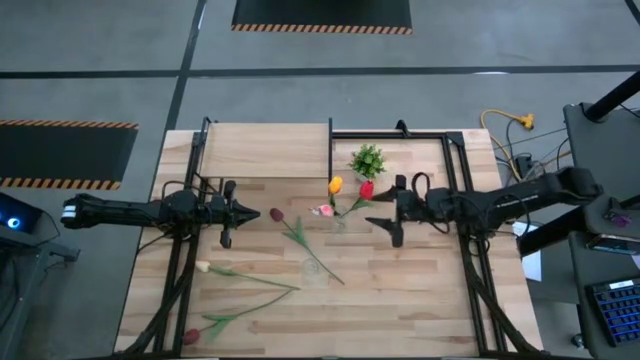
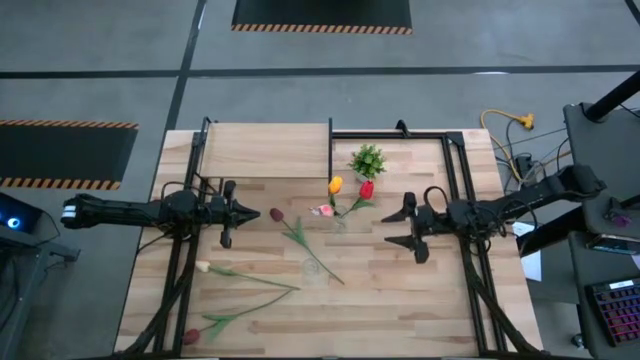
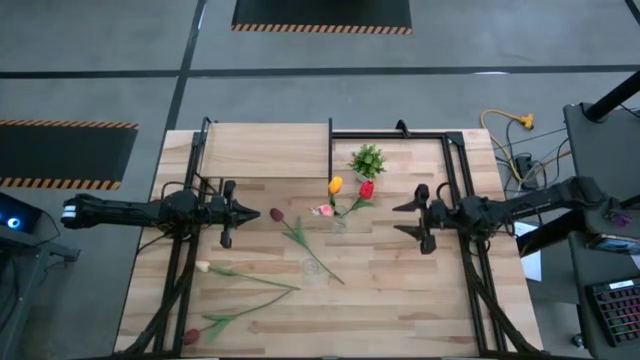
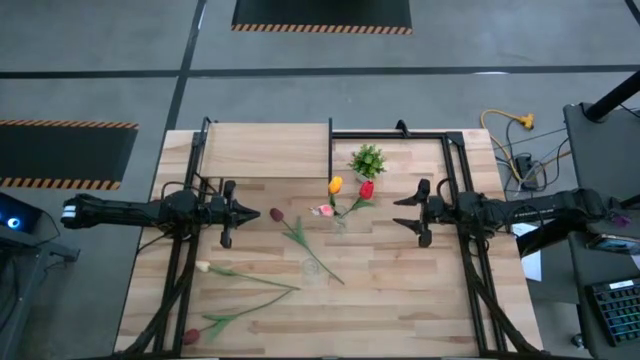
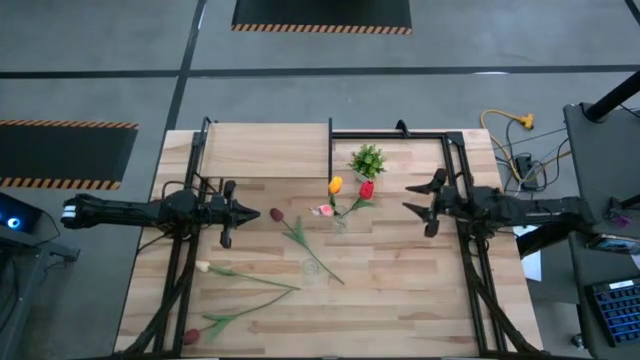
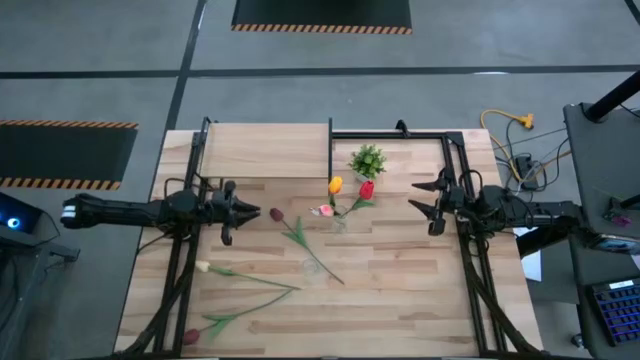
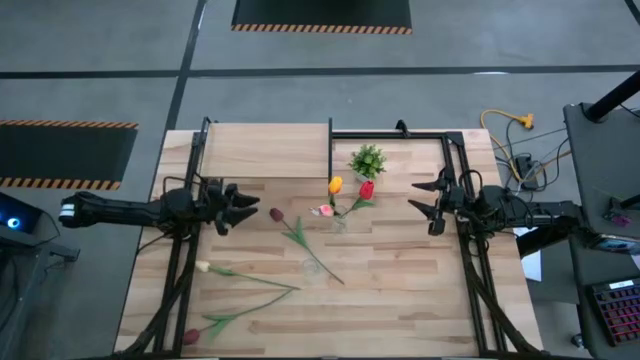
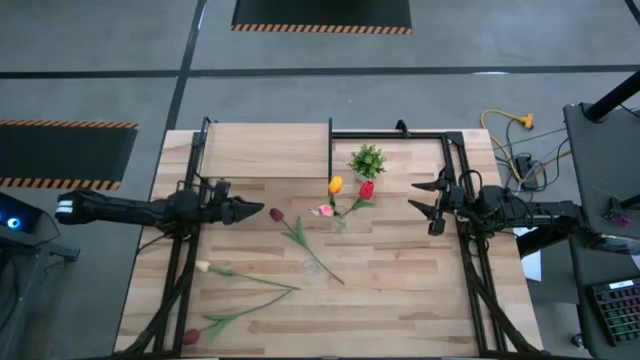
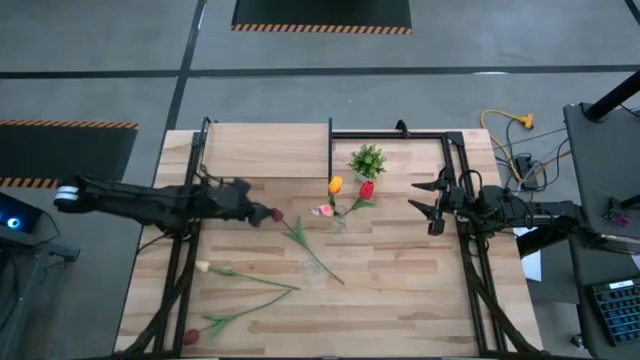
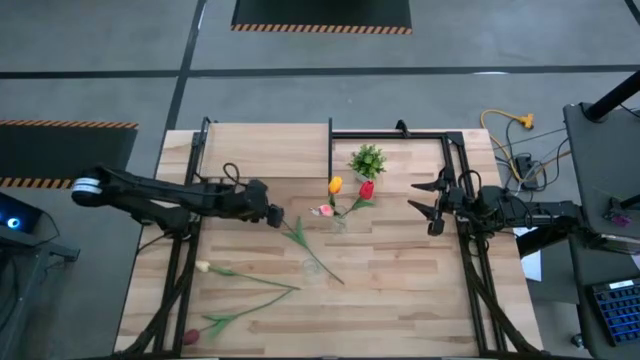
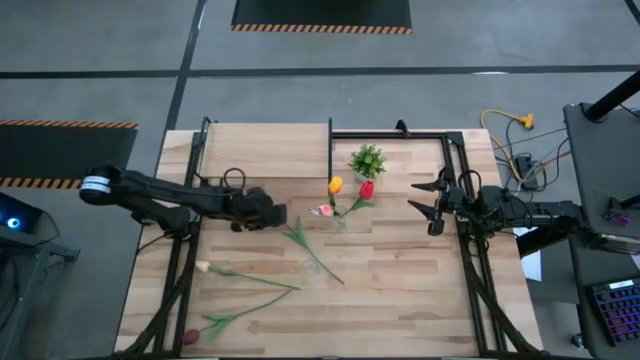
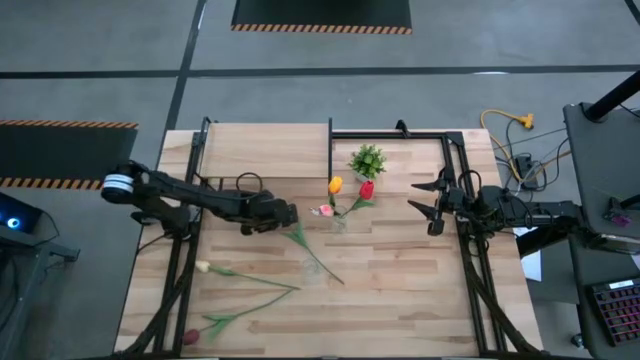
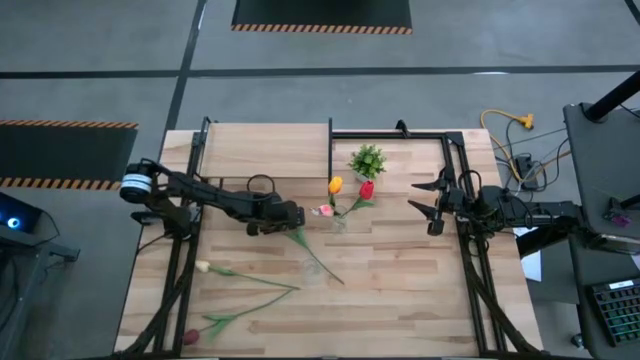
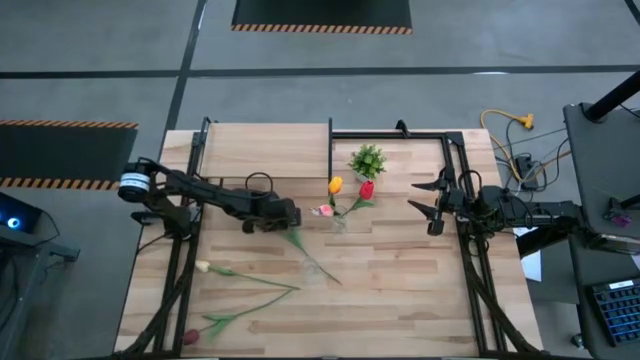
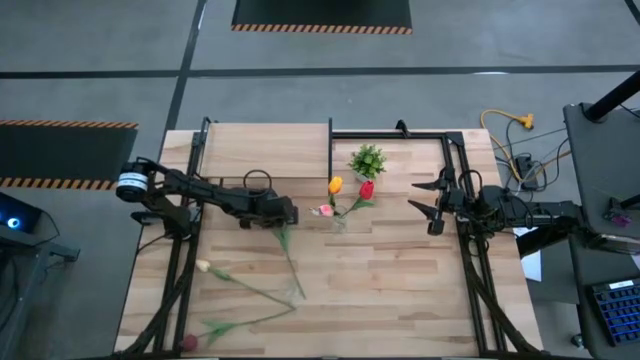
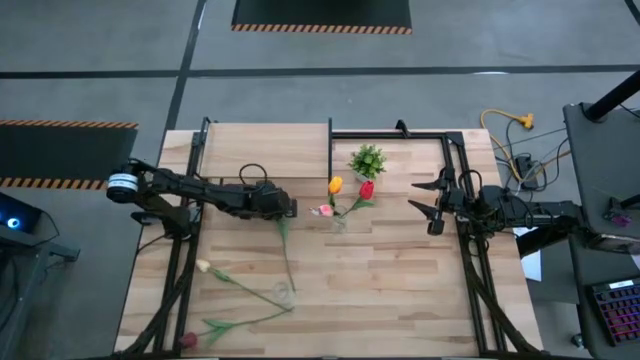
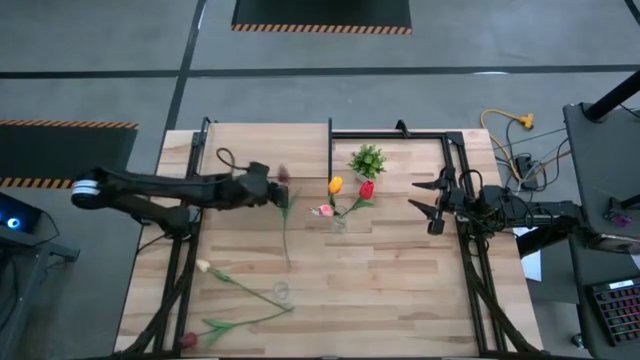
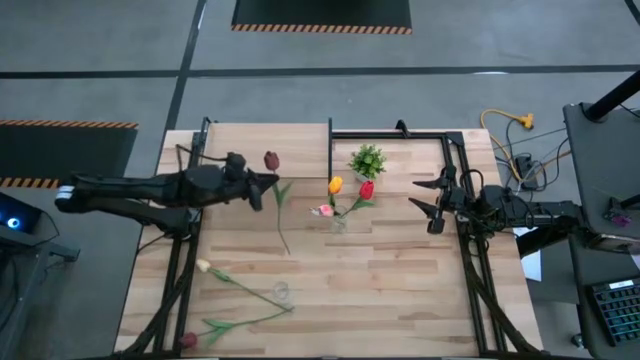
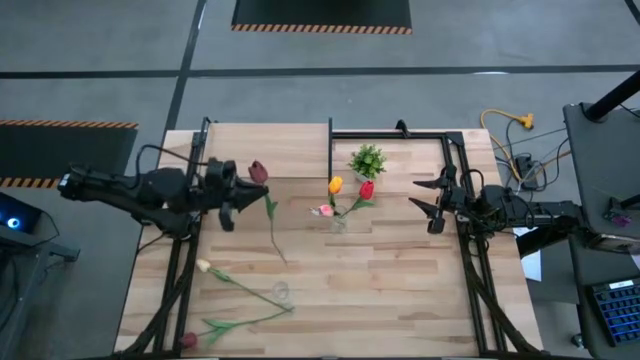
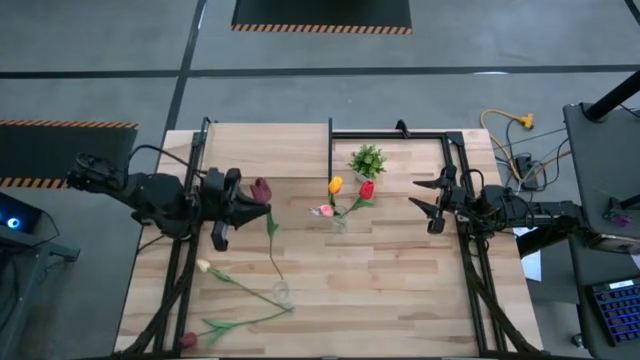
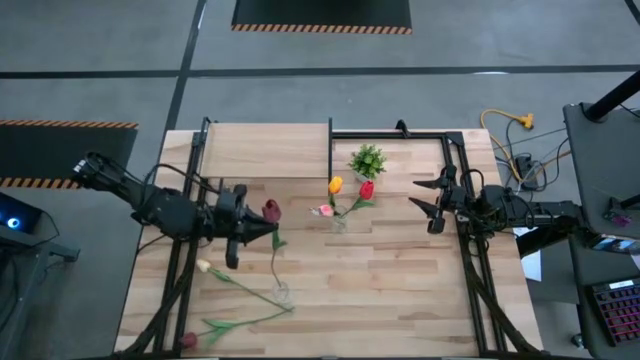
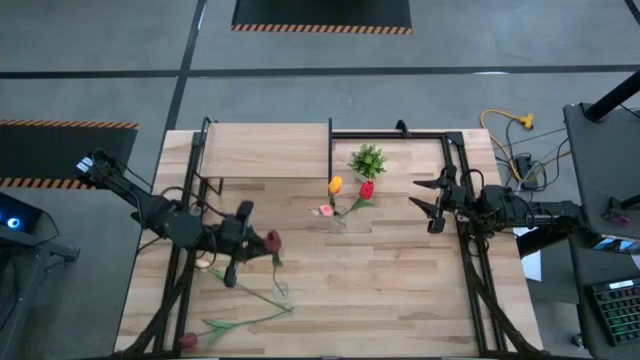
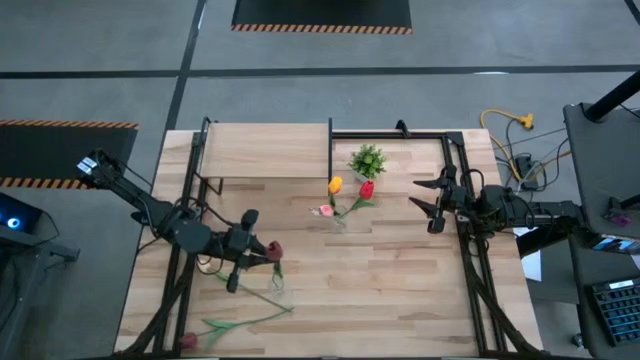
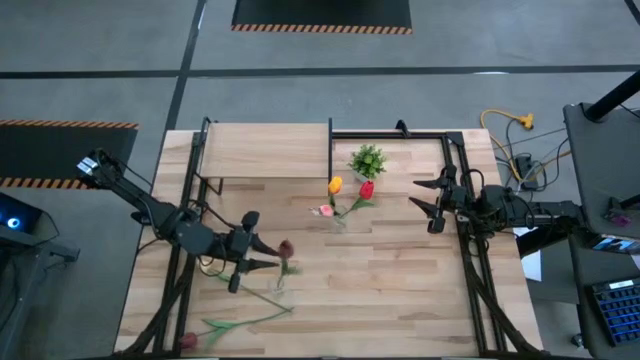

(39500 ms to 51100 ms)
Task: Pick and place flowers into a vace then onto a shelf
Put the top left dark red tulip into the bottom transparent flower vase

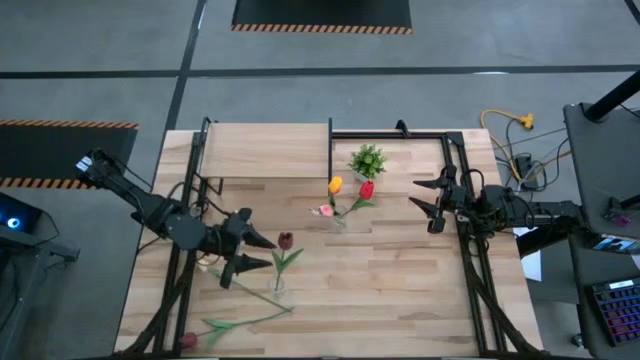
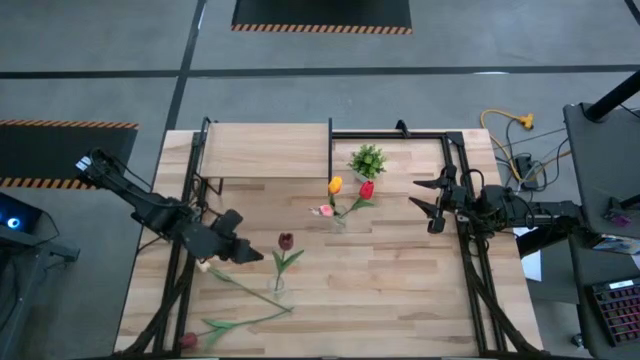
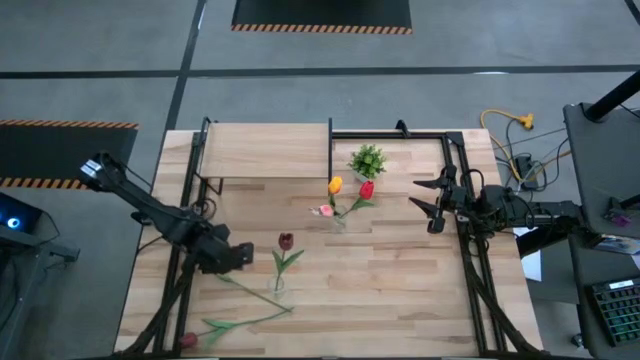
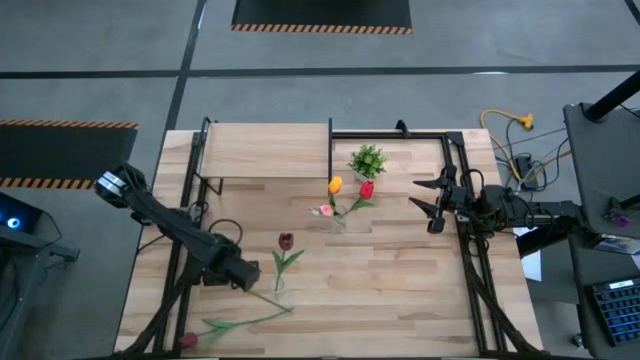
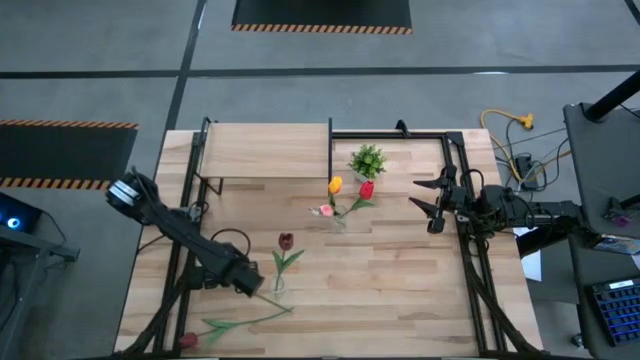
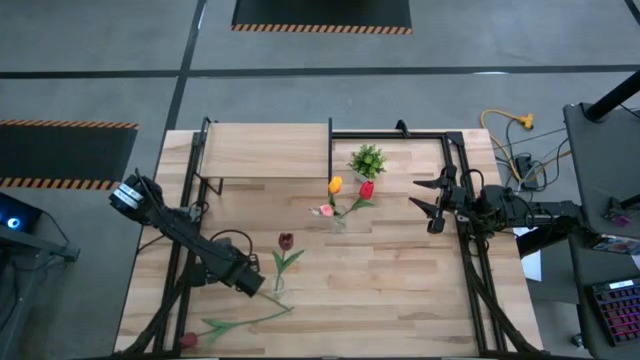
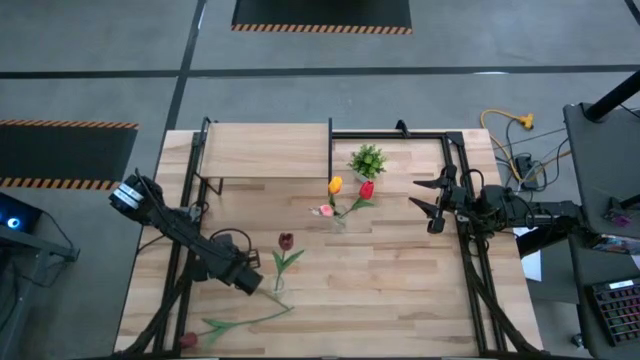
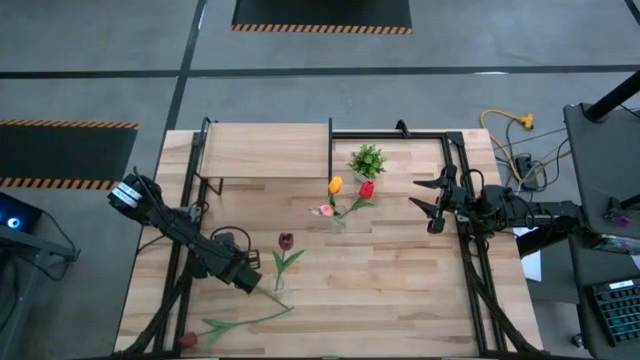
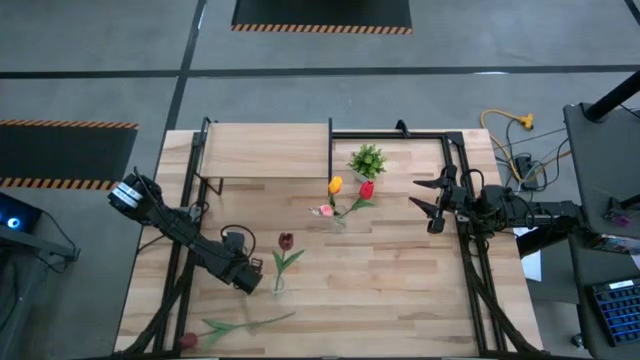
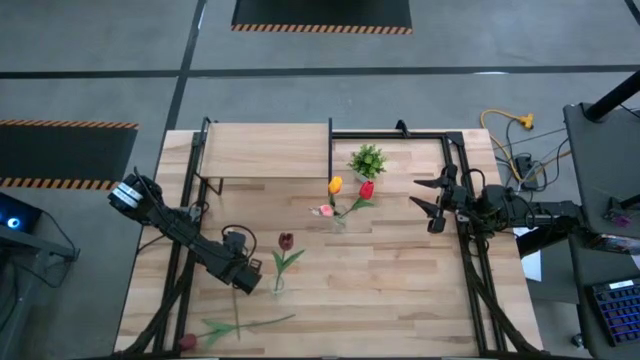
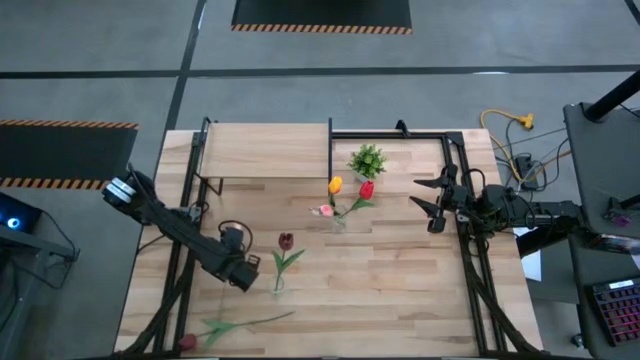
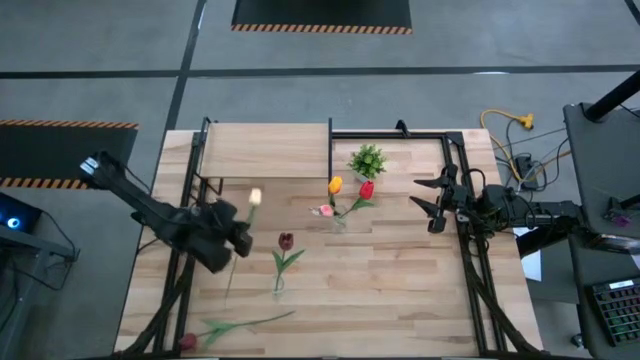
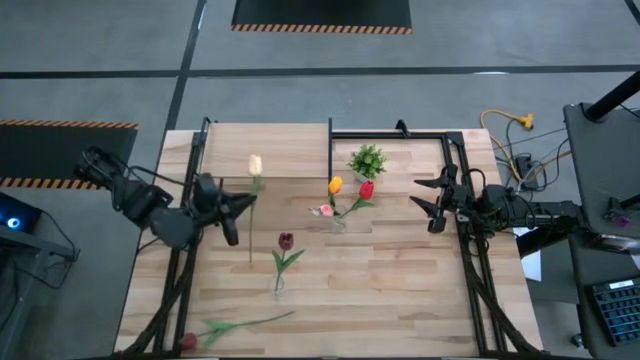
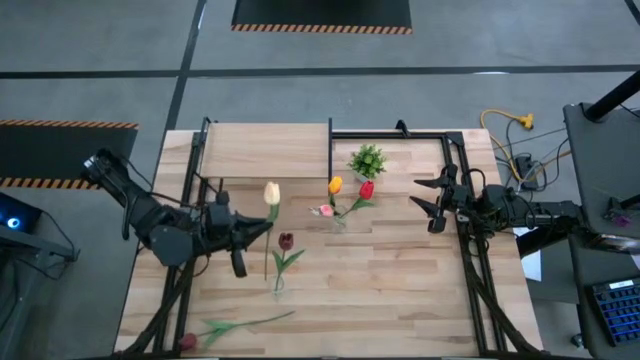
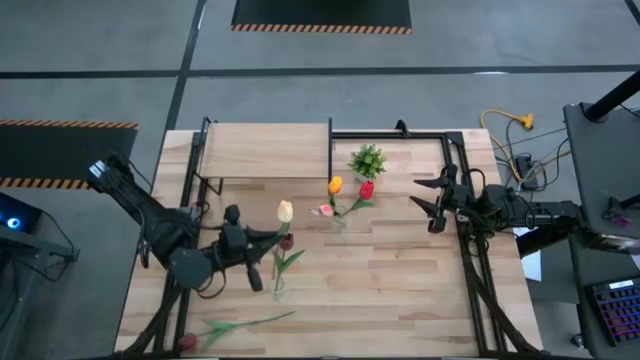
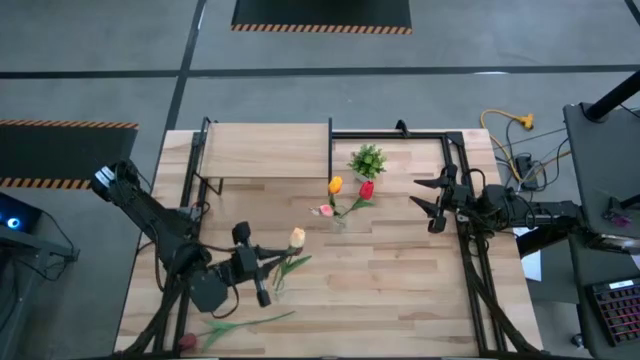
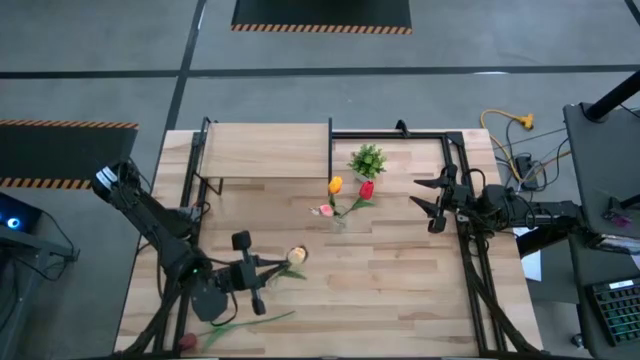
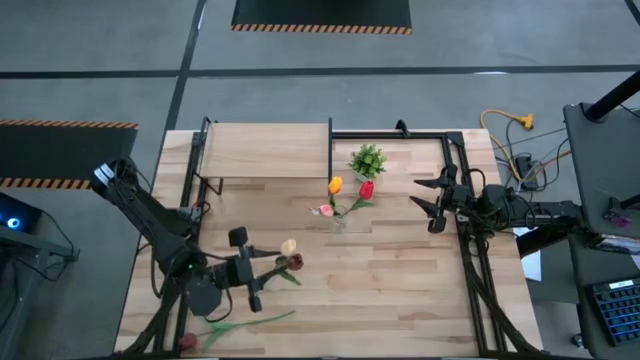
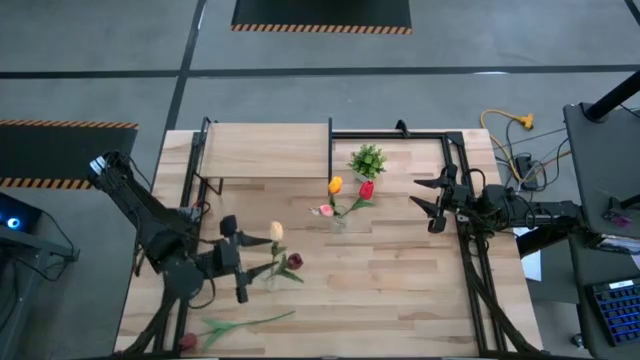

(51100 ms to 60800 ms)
Put the light white tulip into the bottom transparent flower vase
